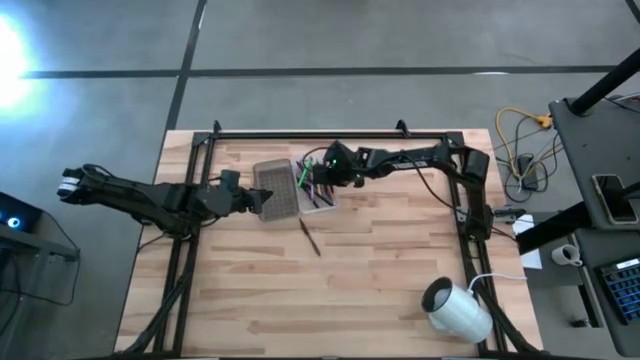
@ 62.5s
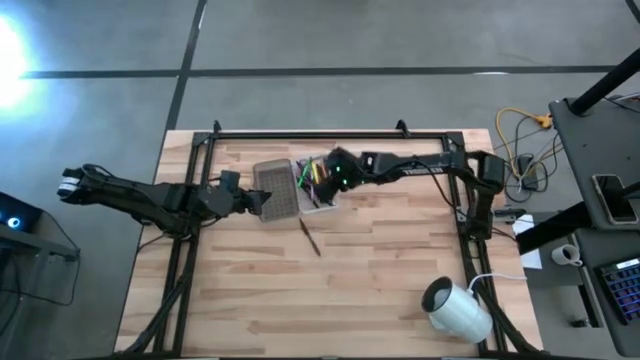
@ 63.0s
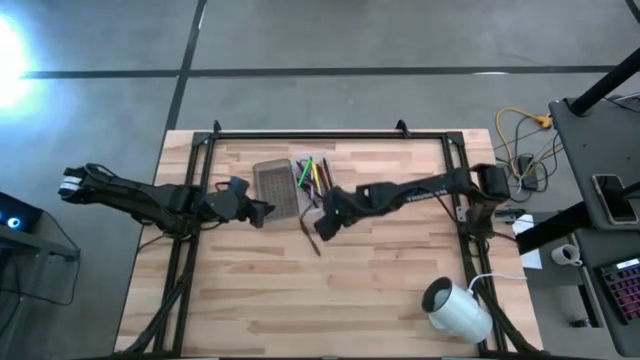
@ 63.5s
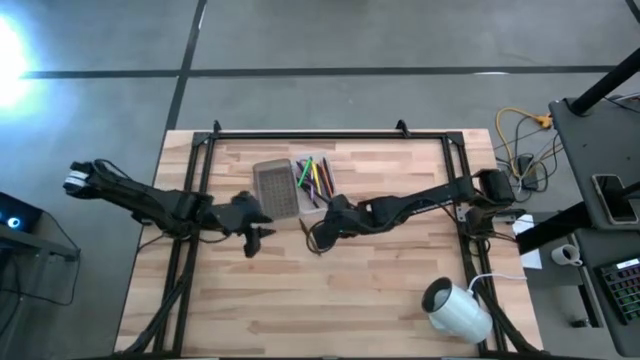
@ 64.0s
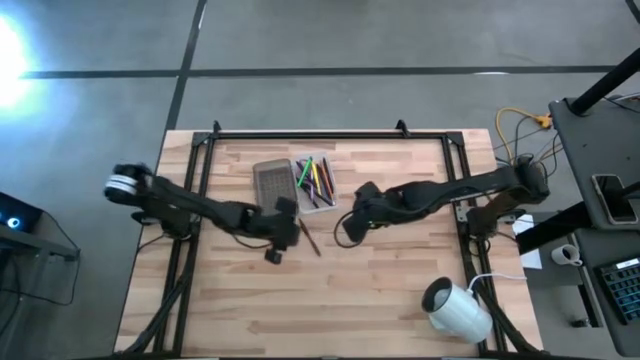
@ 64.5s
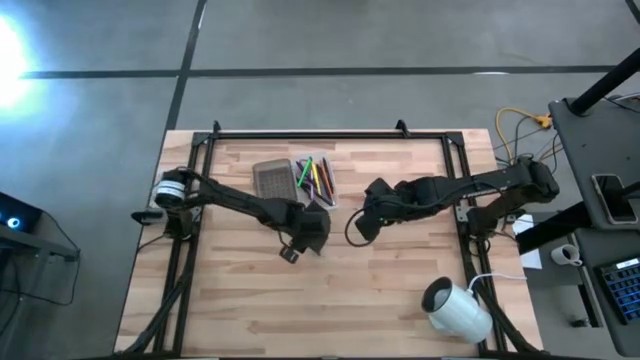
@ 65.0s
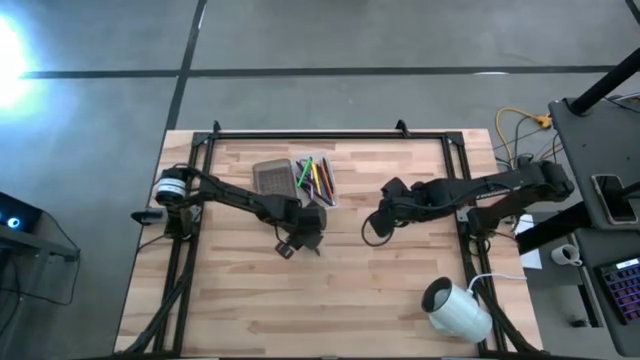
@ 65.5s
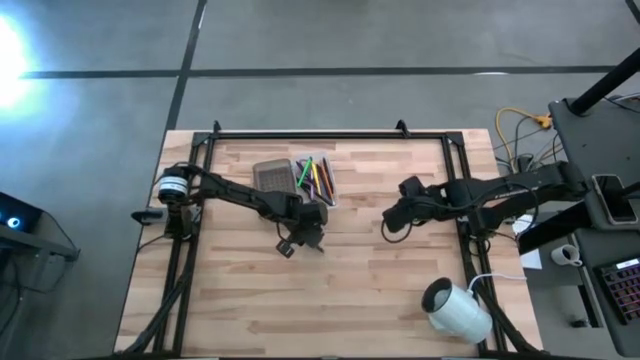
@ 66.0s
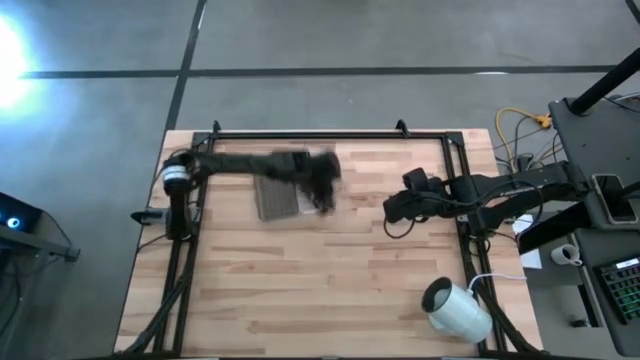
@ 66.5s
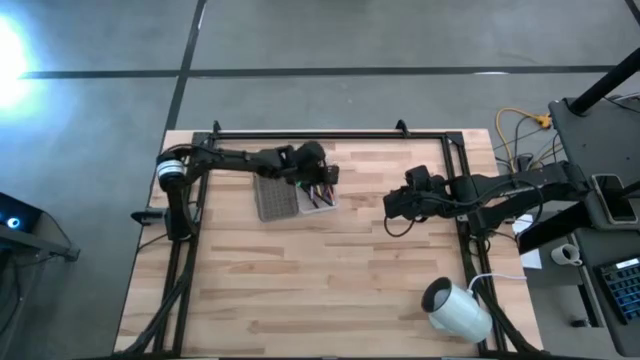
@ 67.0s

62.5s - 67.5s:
Task: Pick & place school supplies into a supply box
Put the brown pen into the supply box

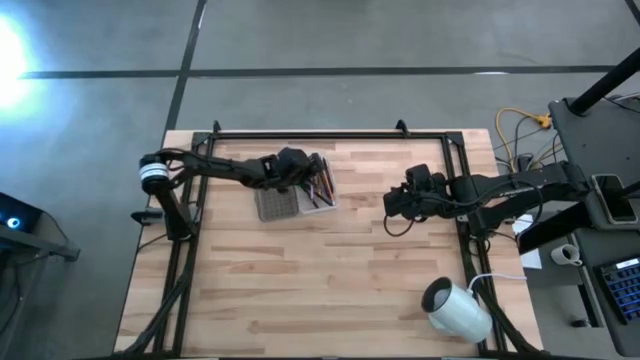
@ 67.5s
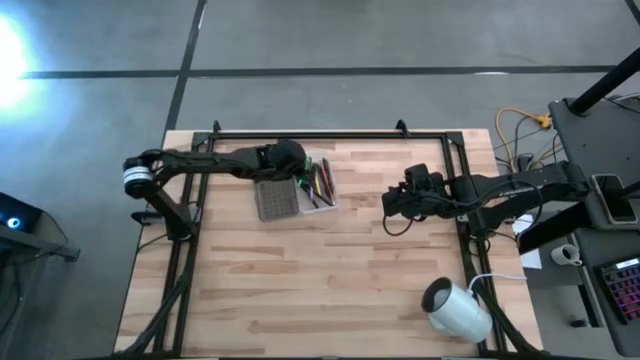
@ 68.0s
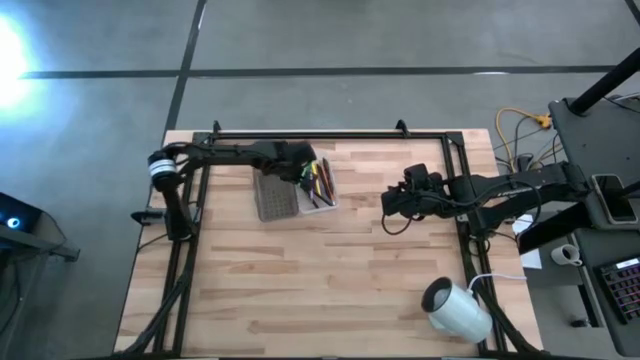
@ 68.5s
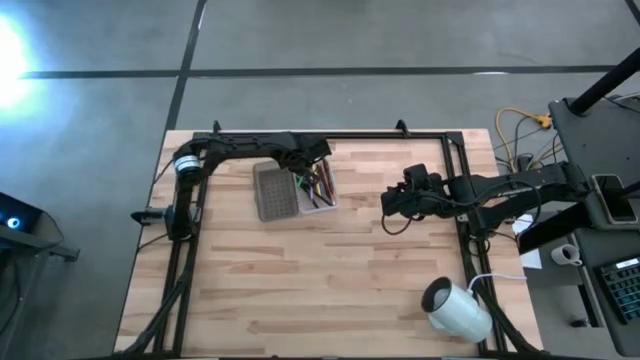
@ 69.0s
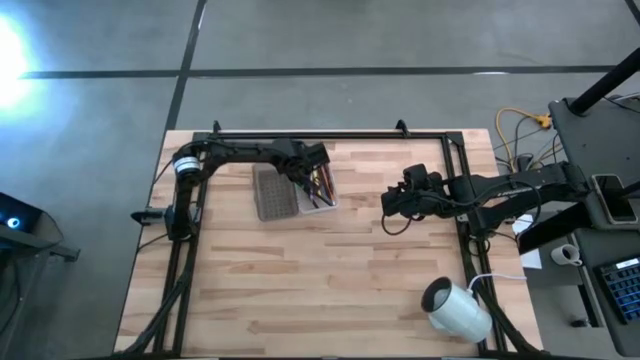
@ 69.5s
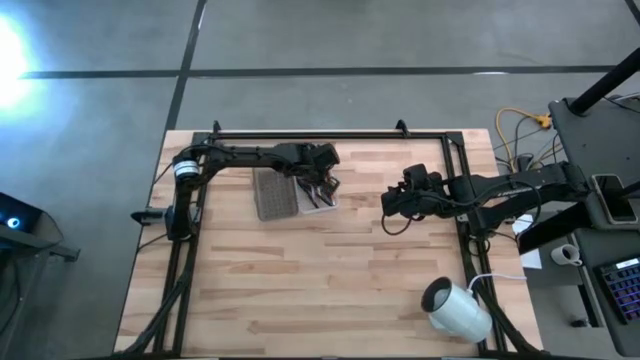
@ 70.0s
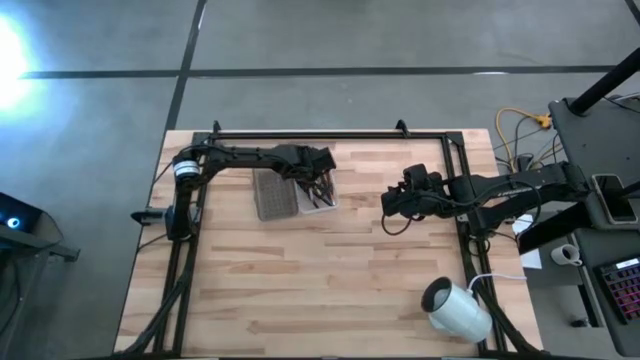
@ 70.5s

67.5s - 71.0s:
Adjust the green pen in the supply box

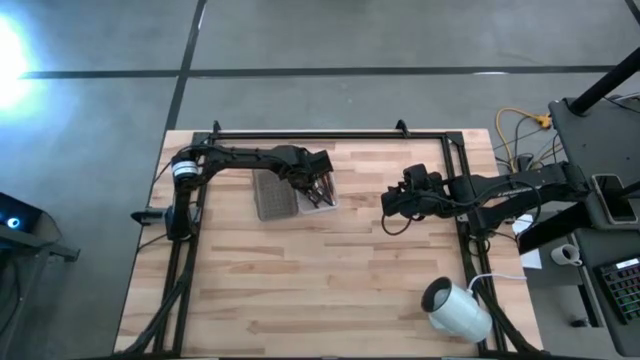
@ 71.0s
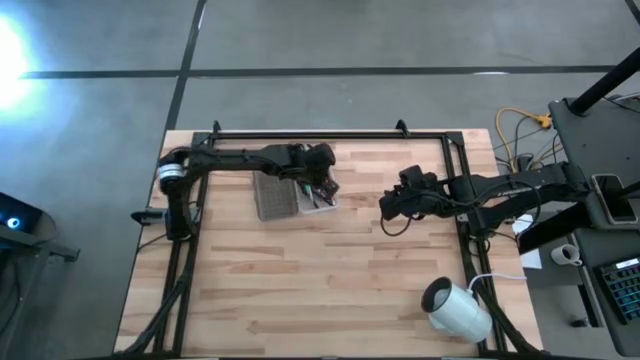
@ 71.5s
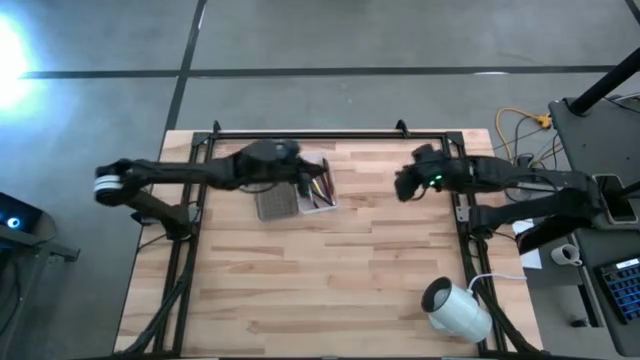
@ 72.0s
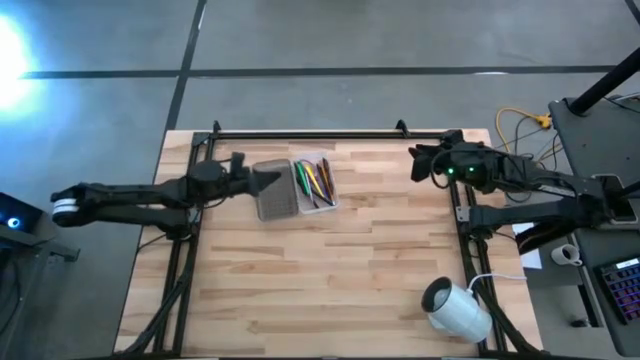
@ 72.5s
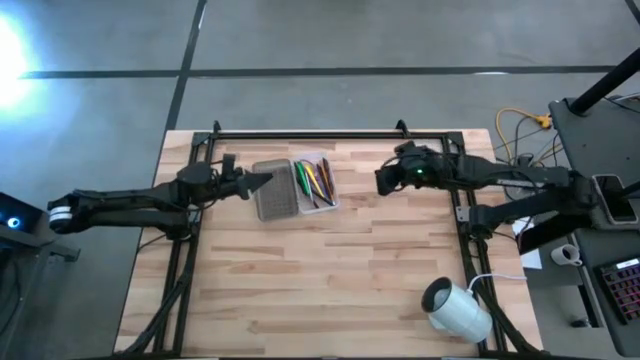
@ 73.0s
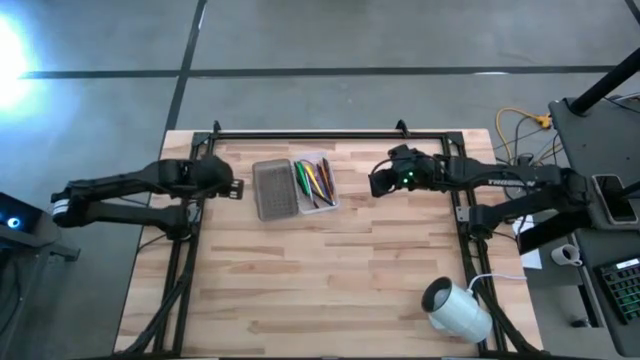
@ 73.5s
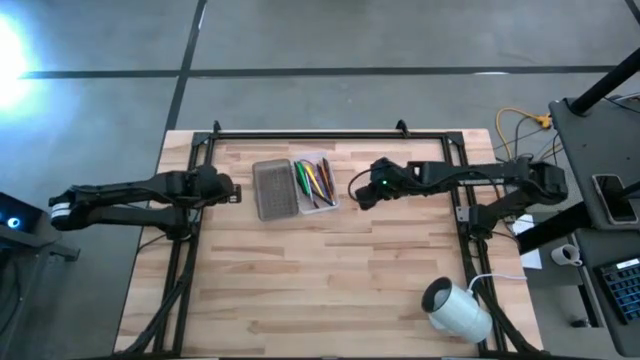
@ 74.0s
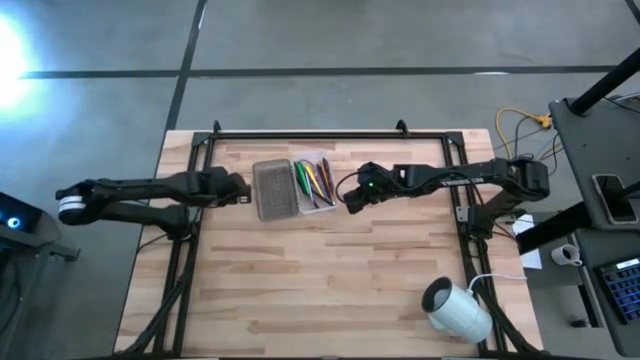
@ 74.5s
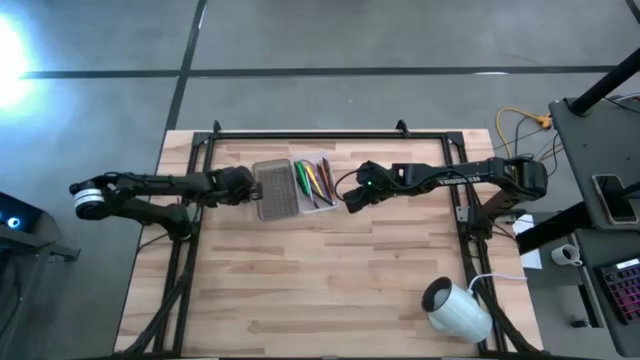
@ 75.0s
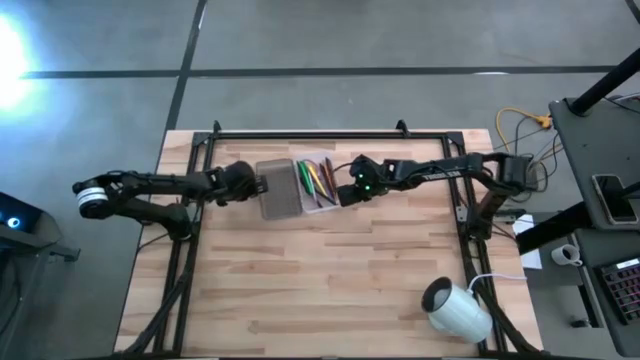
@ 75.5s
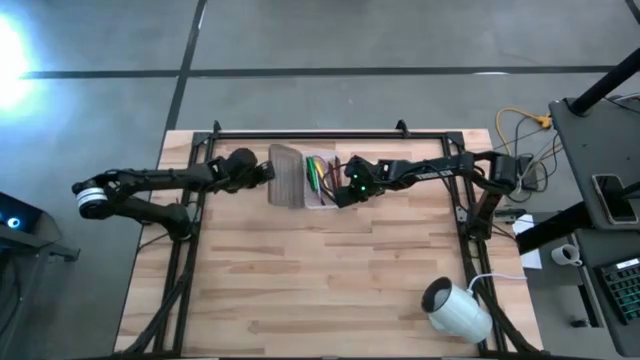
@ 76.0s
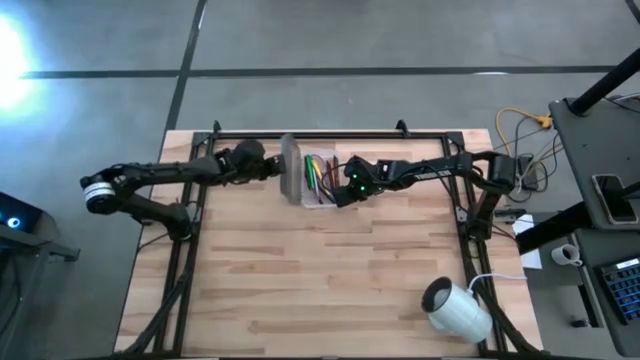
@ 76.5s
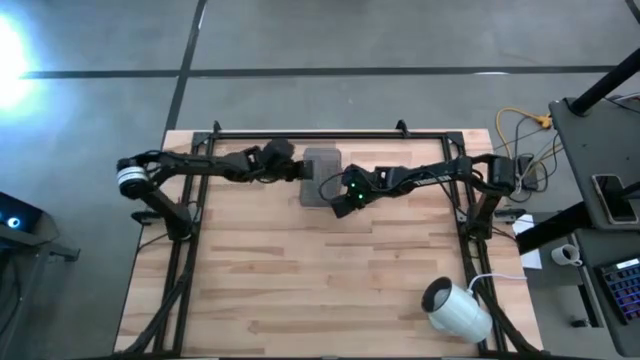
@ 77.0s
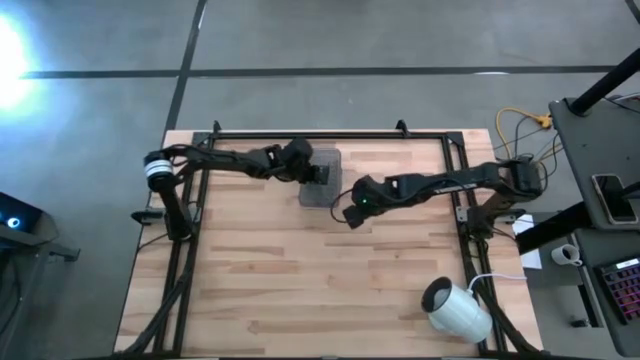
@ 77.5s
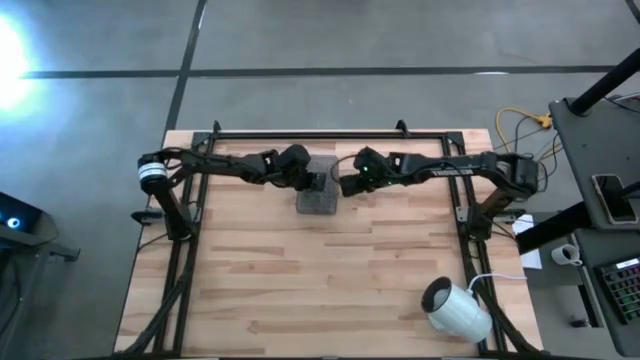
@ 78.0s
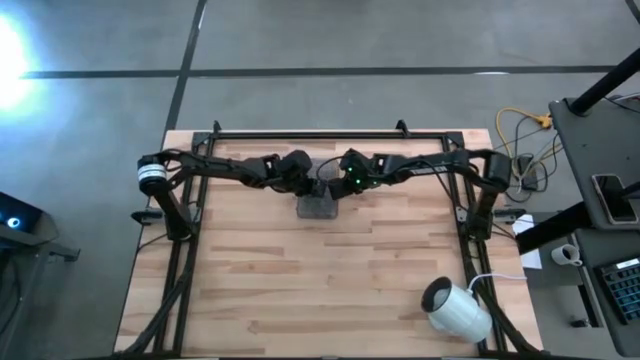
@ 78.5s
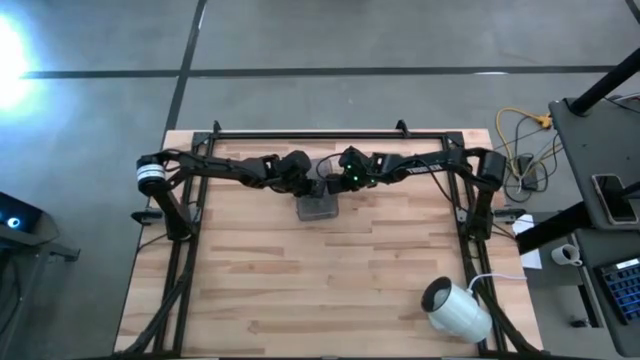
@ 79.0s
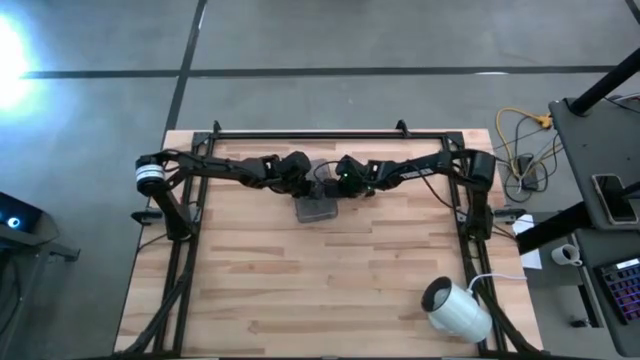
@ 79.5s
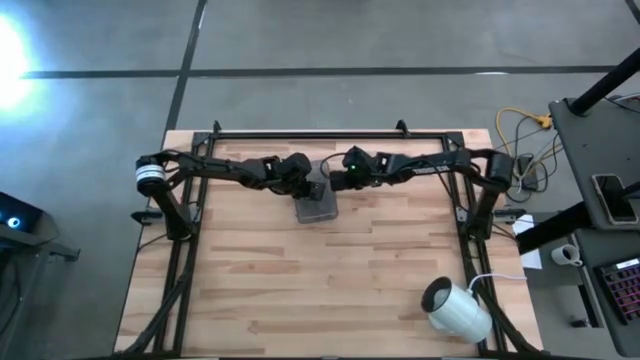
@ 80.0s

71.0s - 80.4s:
Close the supply box

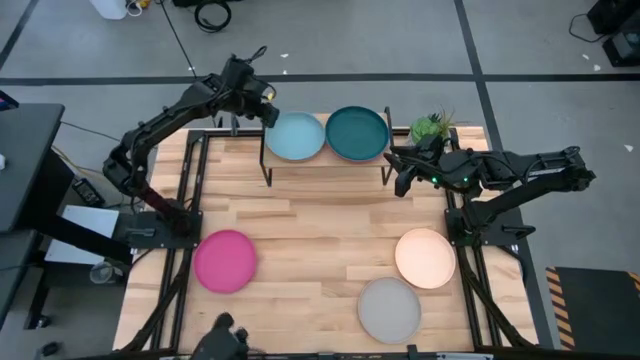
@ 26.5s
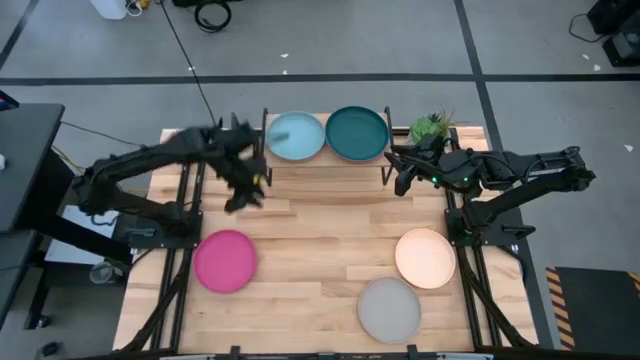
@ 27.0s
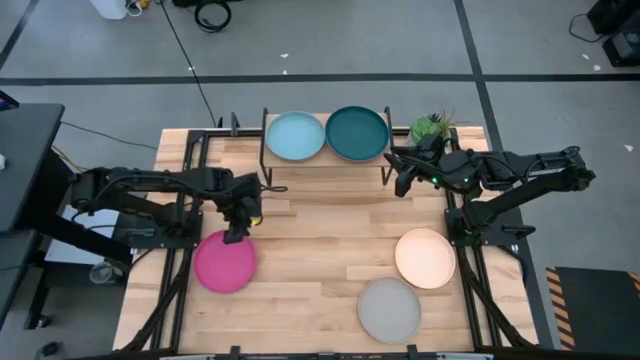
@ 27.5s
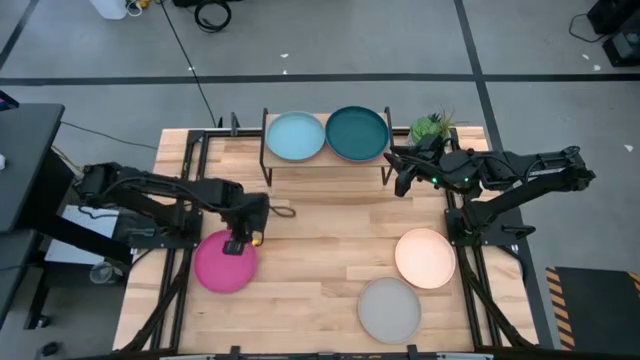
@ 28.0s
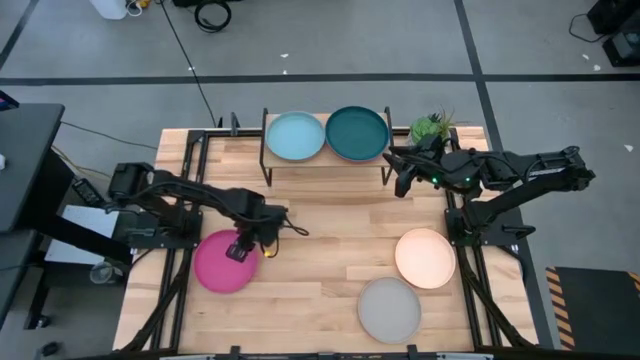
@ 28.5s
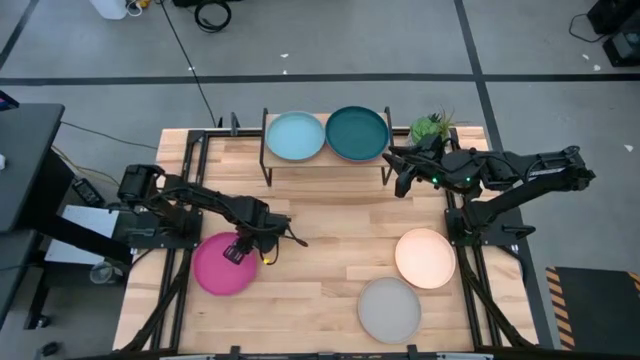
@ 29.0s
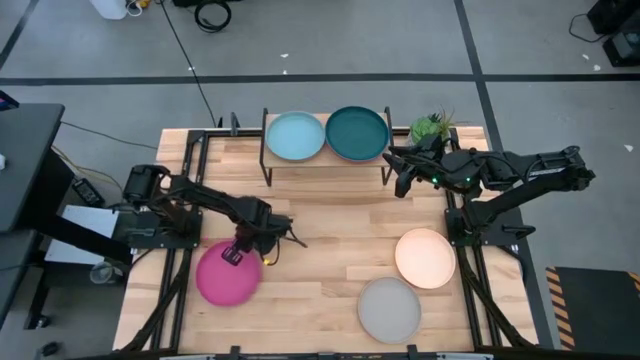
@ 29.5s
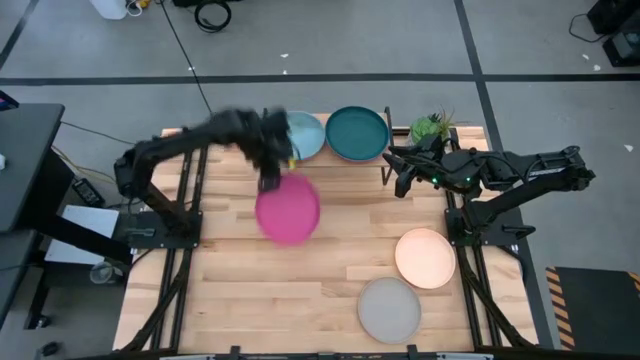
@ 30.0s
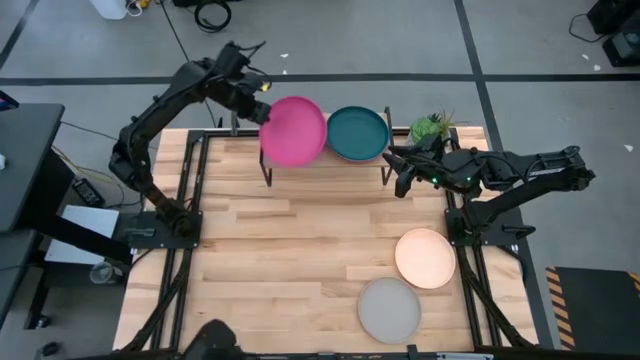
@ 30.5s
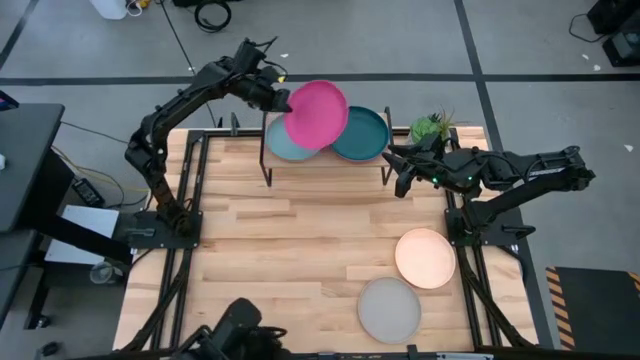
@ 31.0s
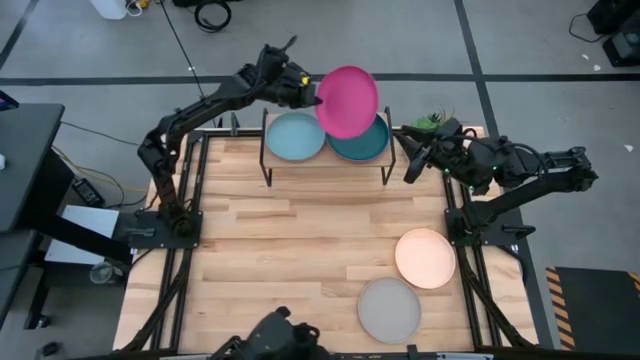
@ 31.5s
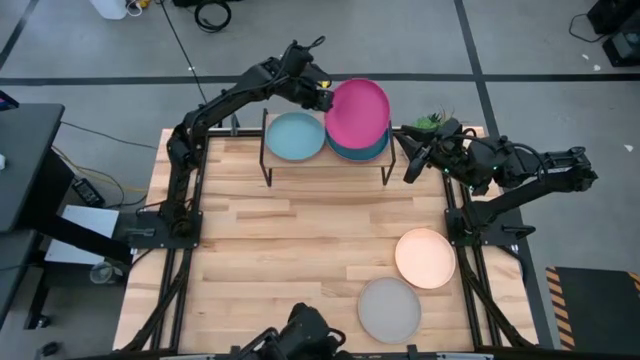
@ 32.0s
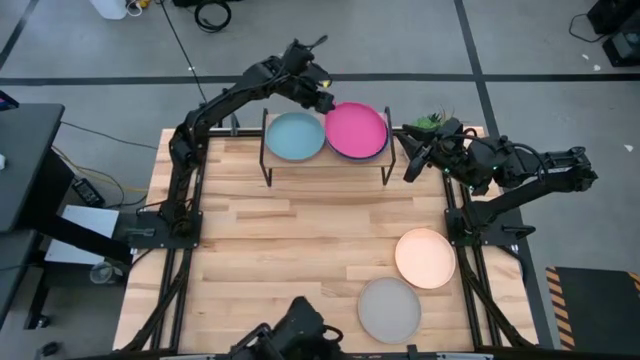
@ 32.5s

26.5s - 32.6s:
Task: Place and stack plates onto a shelf
Stack the pink plate on top of the dark green plate on the shelf
